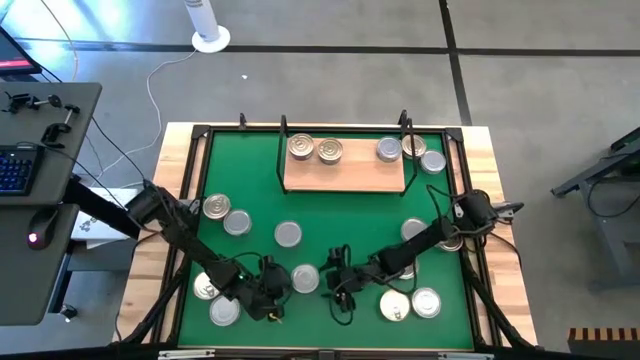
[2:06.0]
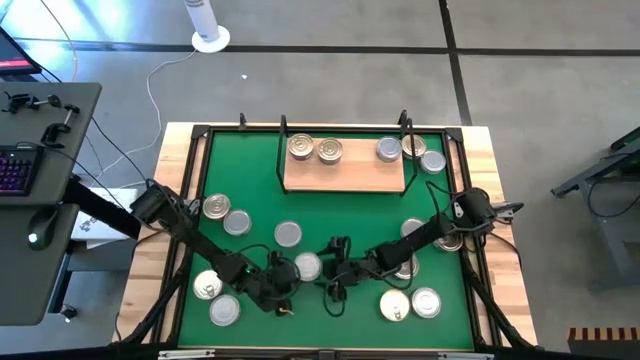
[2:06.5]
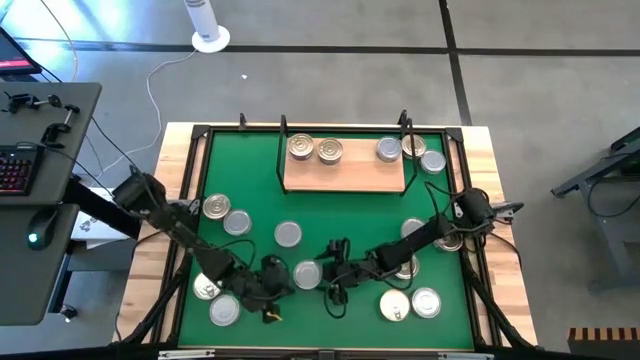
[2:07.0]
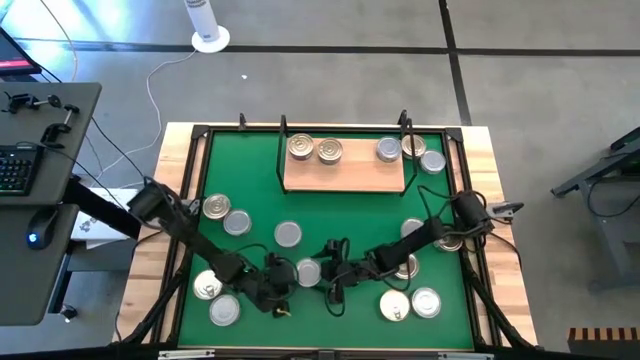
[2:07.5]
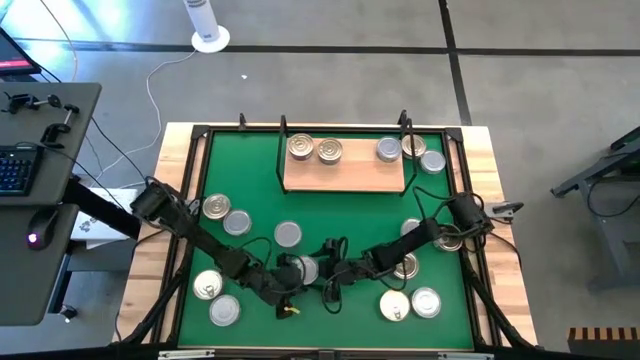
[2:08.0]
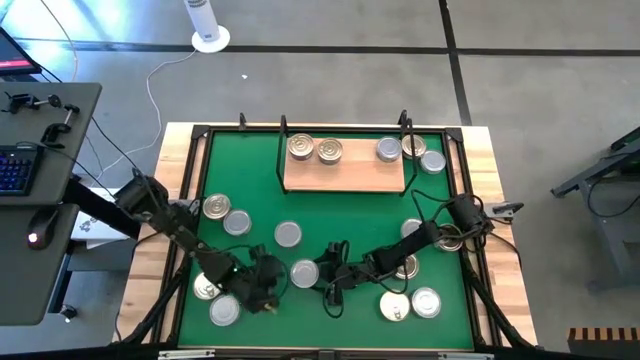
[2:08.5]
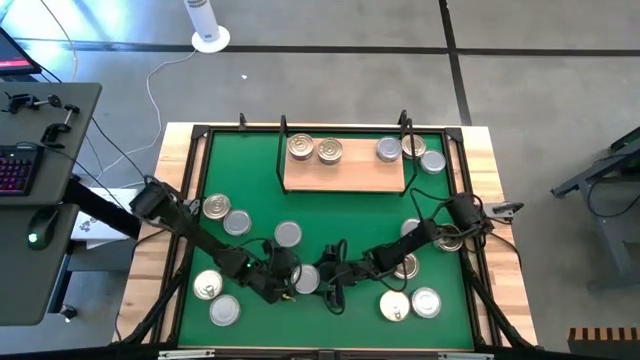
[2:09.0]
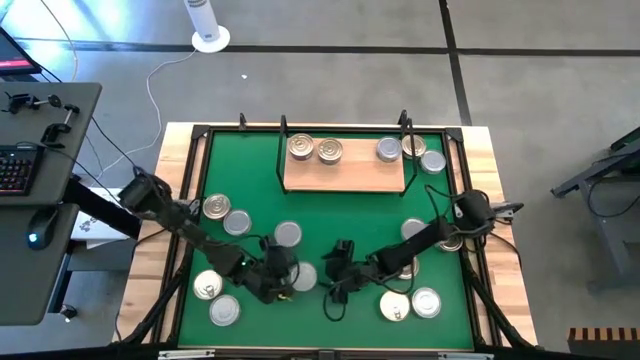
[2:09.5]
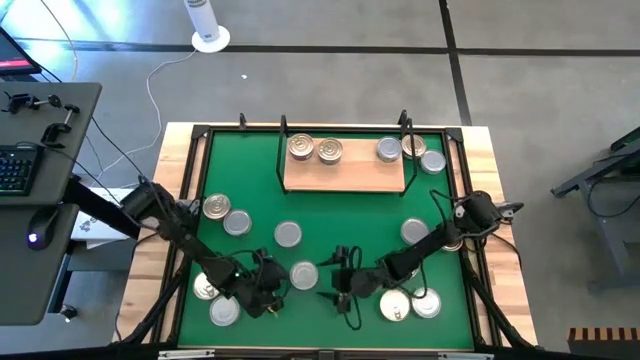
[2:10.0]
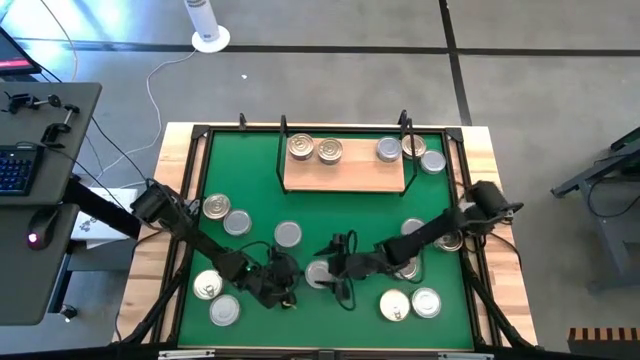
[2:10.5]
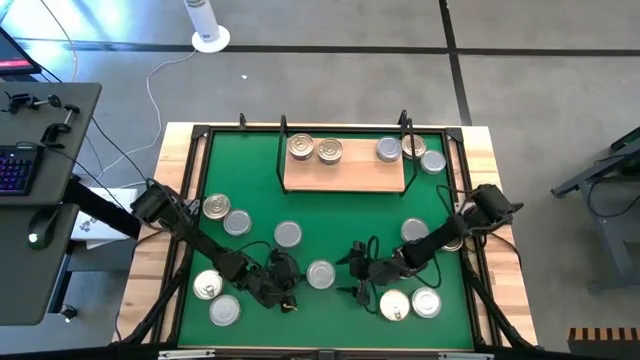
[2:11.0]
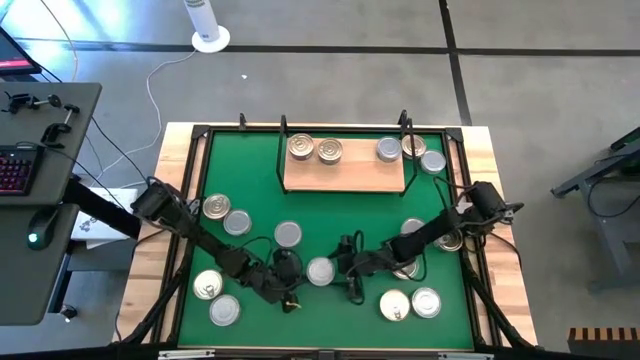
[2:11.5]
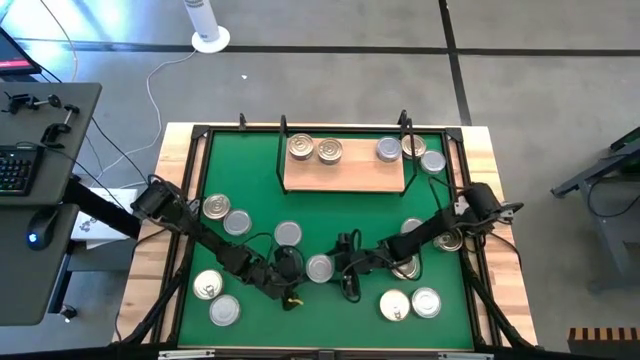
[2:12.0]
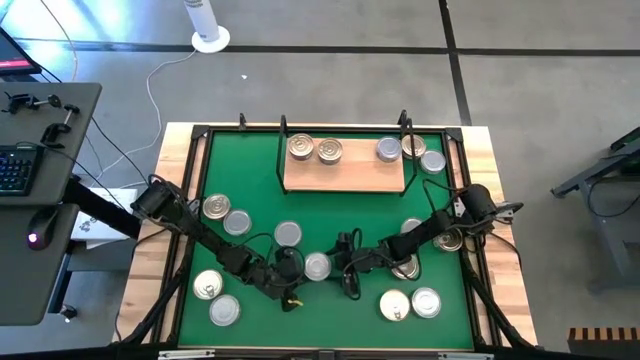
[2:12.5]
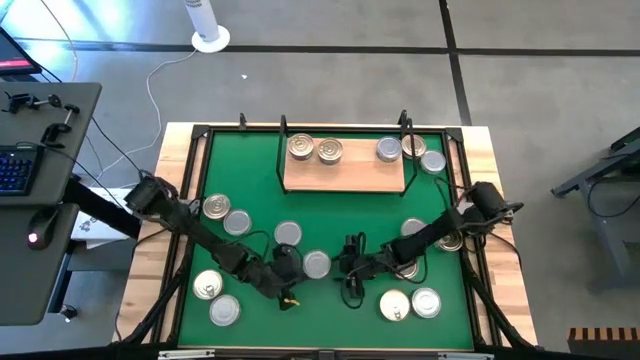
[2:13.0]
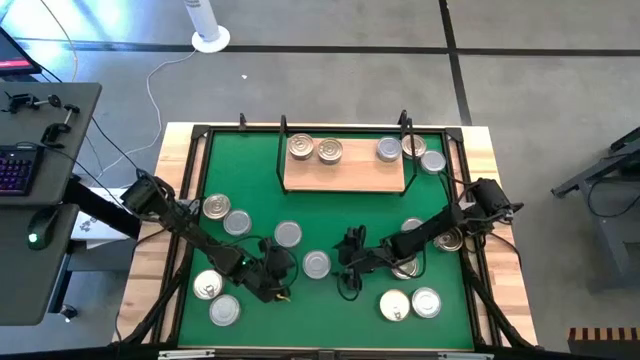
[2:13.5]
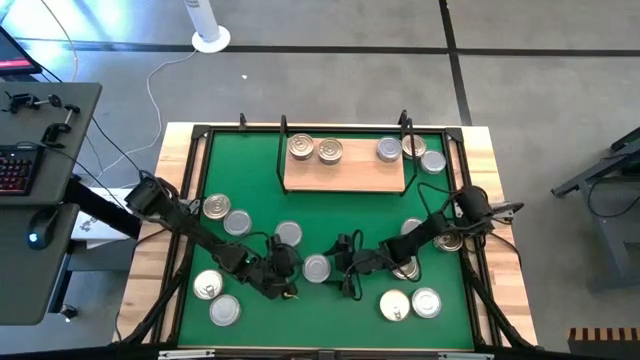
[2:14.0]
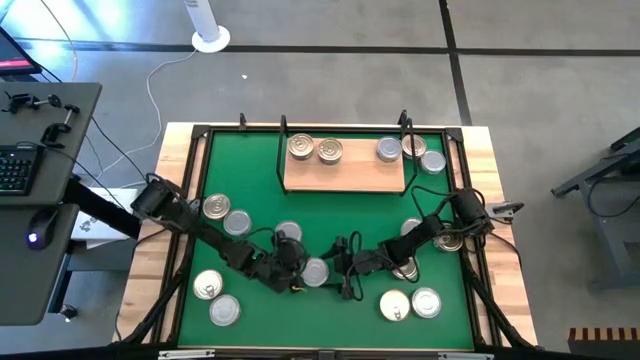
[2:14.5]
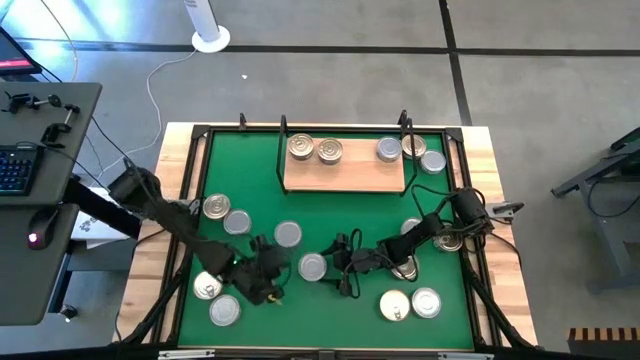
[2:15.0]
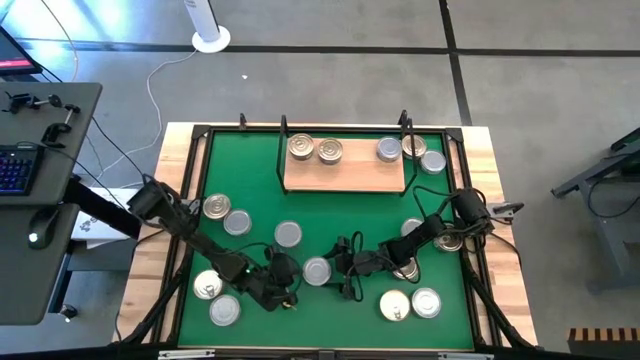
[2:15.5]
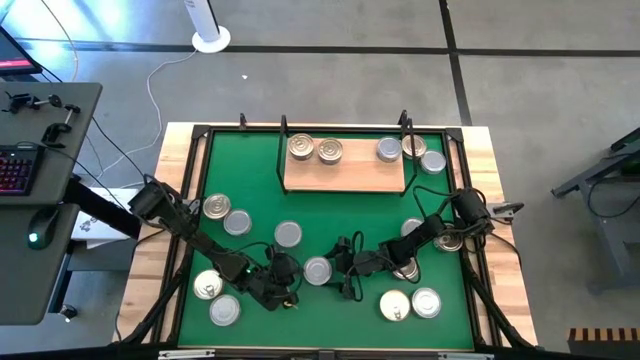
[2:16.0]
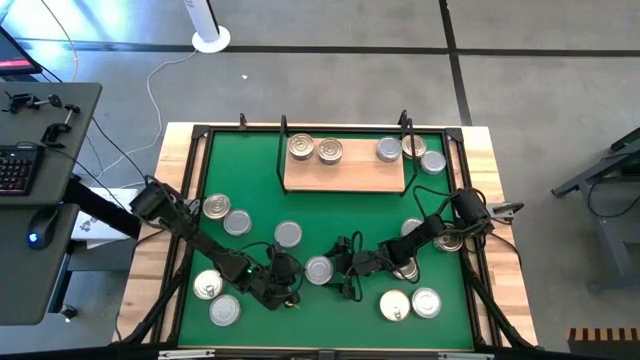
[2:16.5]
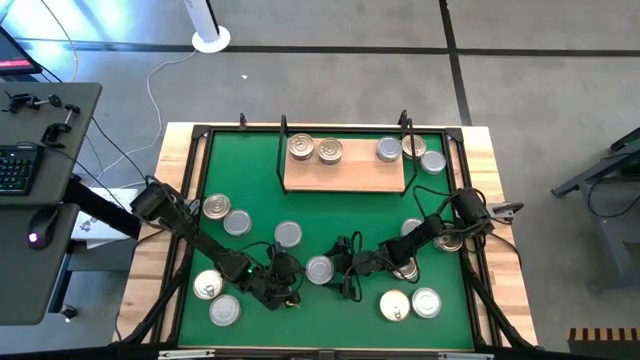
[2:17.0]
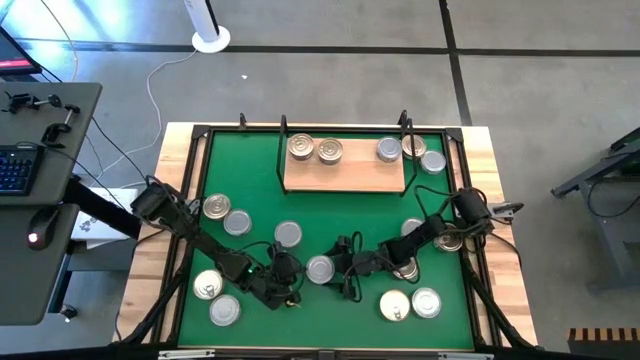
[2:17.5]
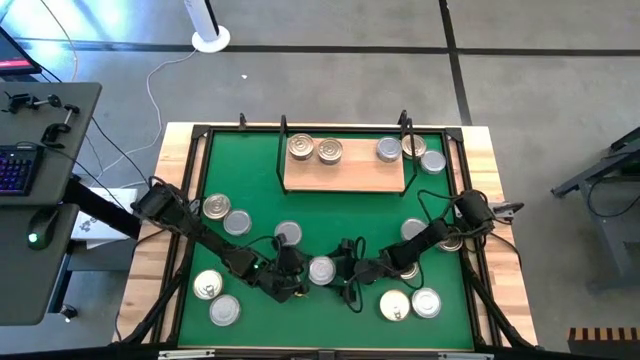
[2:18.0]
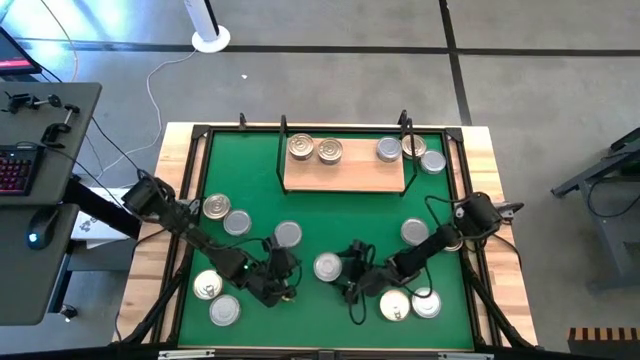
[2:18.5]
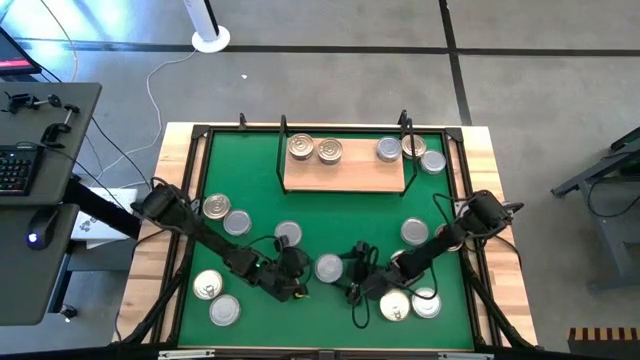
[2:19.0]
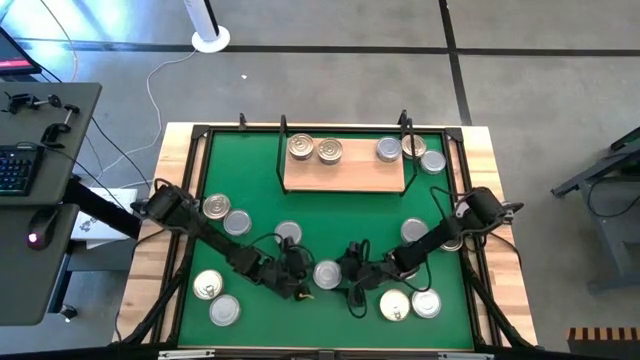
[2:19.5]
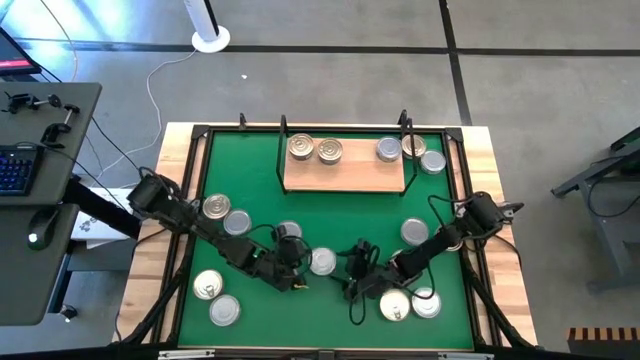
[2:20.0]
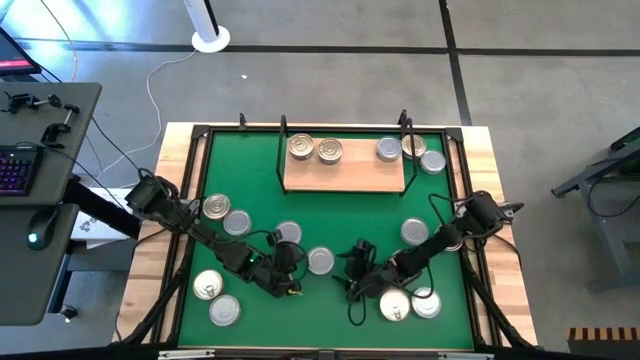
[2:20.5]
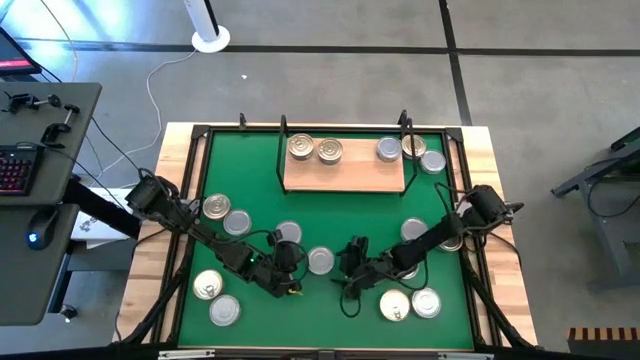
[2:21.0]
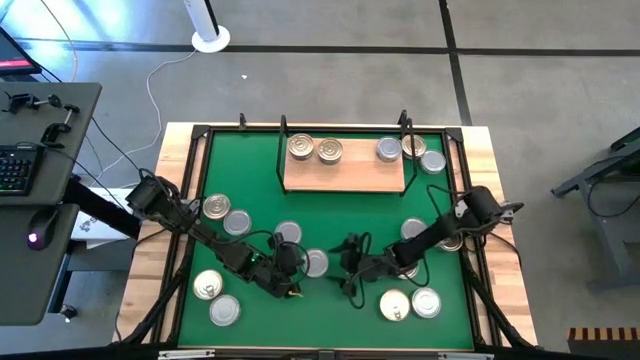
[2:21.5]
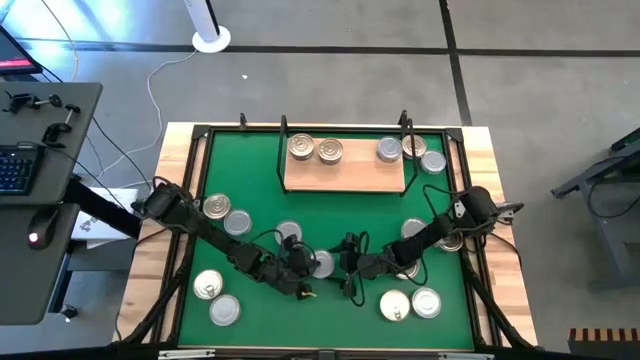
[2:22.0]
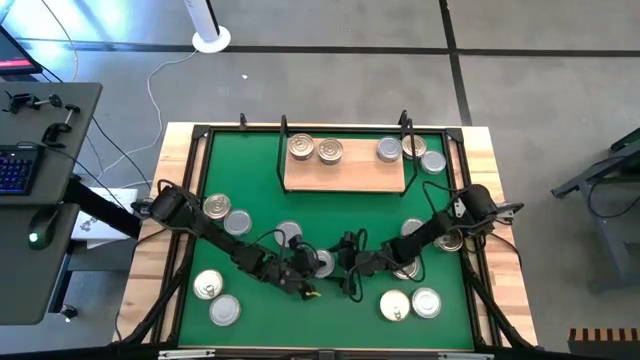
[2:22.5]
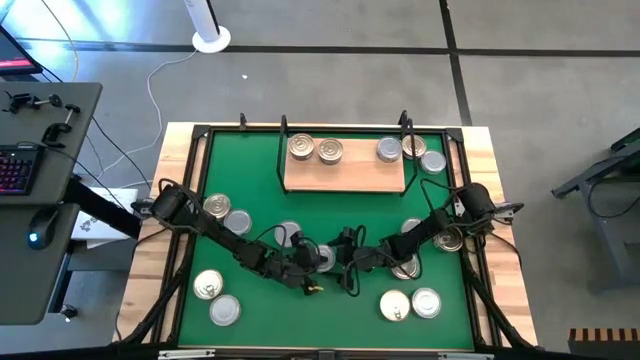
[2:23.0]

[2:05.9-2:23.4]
Task: Stack canned seafood by type on shelf
Put the green tuna can on the shelf

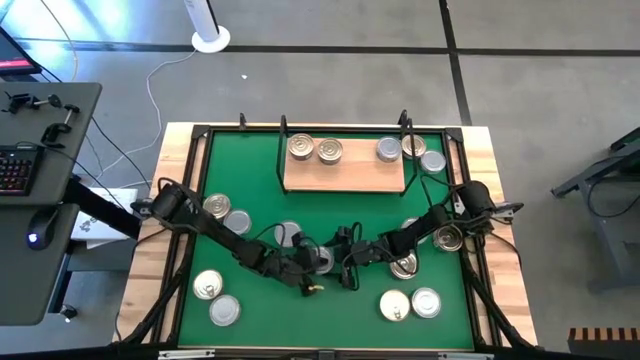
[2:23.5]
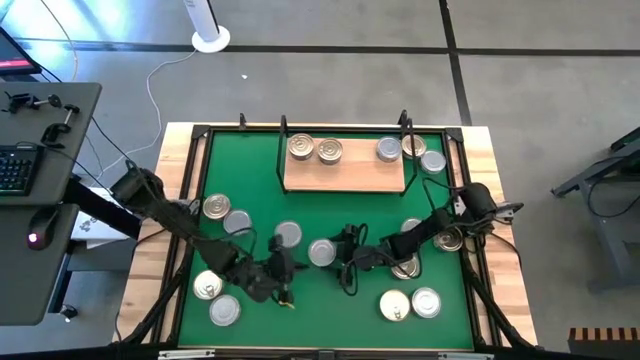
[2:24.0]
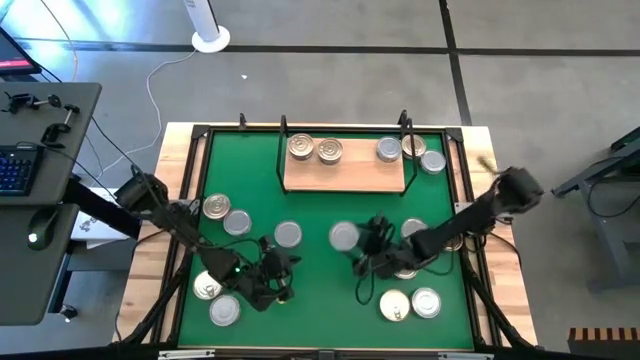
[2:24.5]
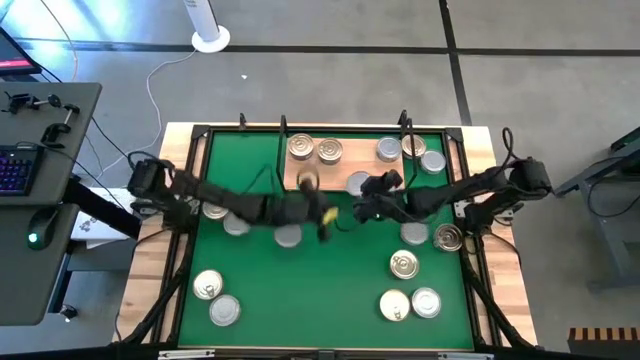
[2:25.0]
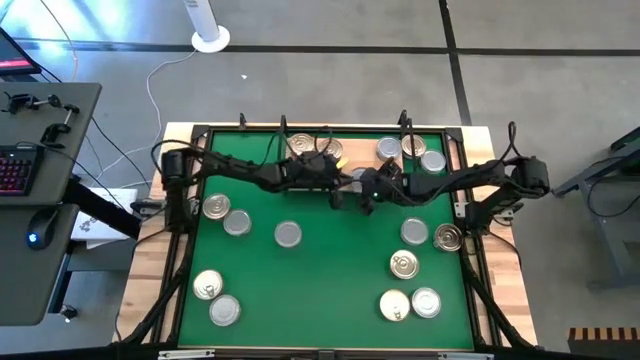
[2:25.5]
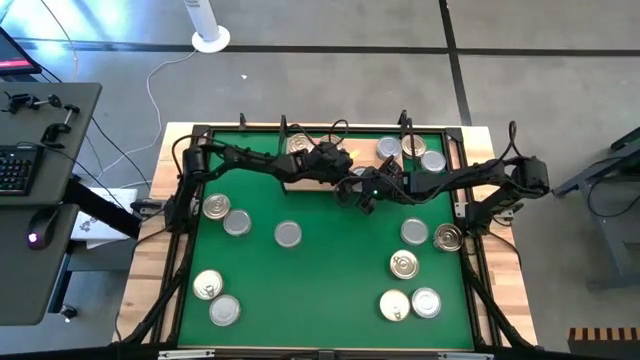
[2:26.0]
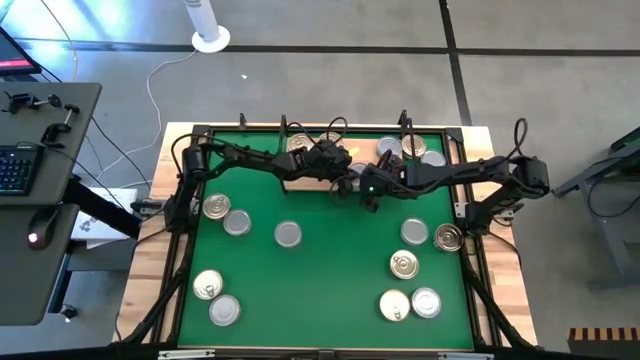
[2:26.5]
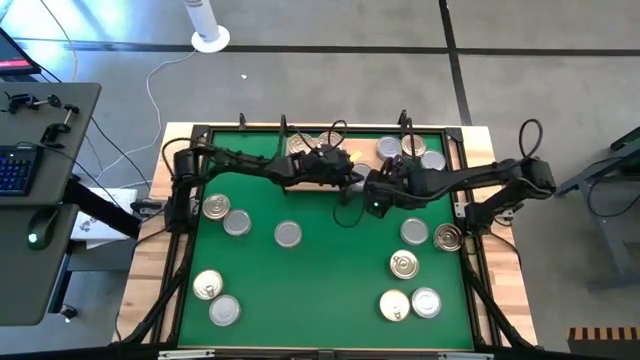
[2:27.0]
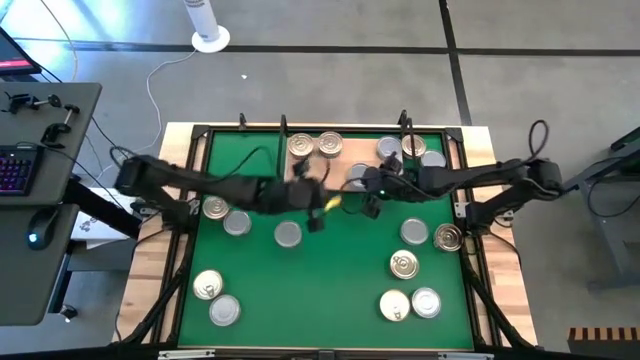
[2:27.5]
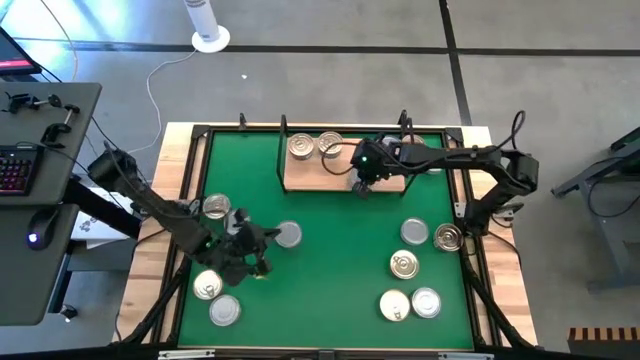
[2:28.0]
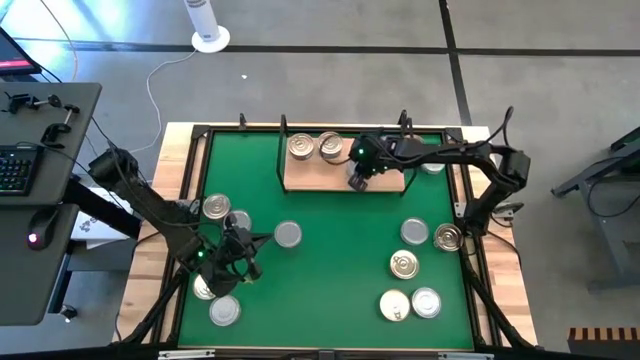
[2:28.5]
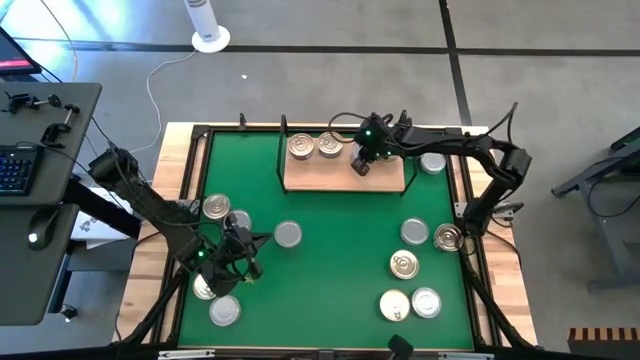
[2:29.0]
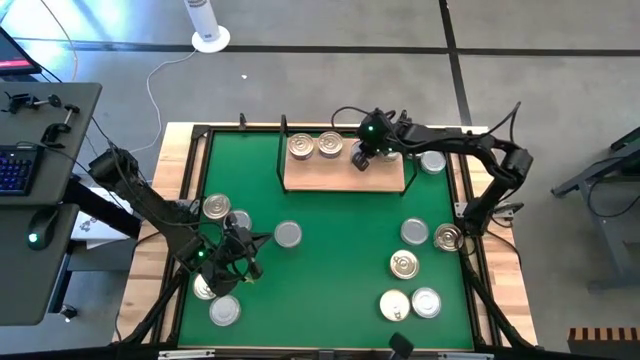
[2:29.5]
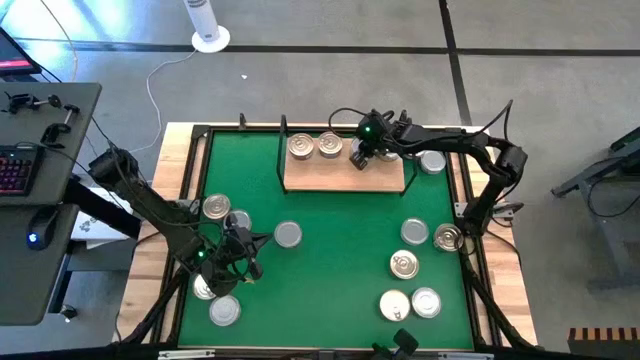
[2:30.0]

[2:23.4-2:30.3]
Put the green tuna can on the shelf
